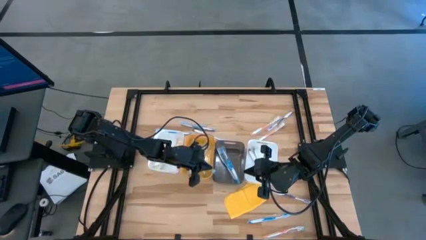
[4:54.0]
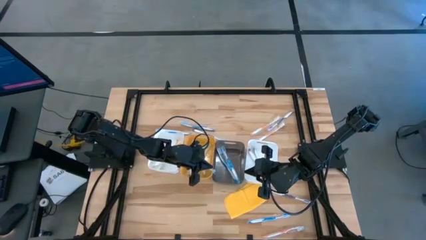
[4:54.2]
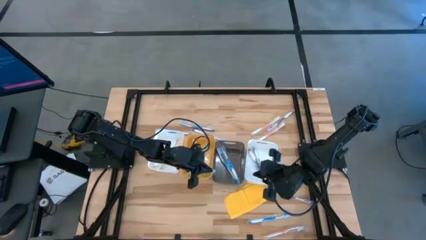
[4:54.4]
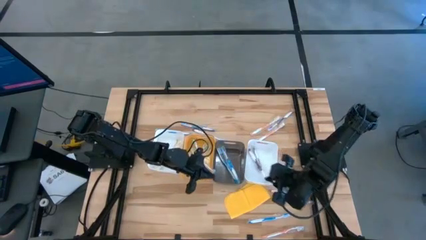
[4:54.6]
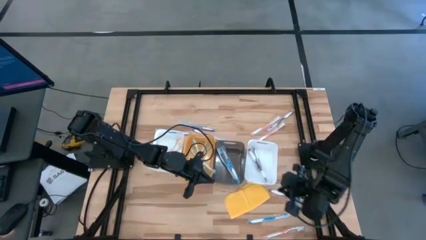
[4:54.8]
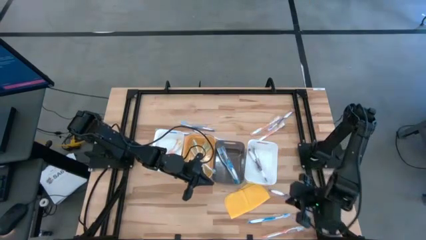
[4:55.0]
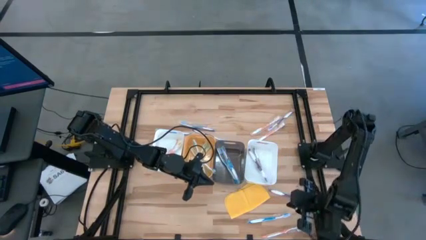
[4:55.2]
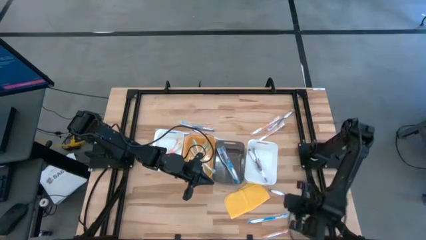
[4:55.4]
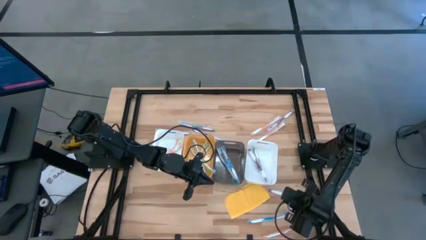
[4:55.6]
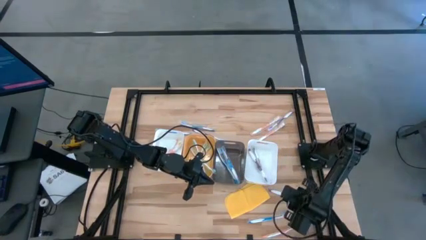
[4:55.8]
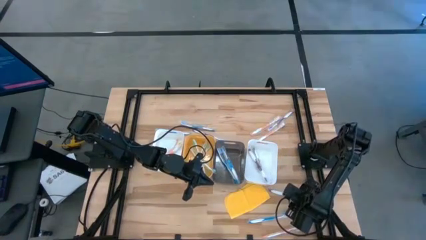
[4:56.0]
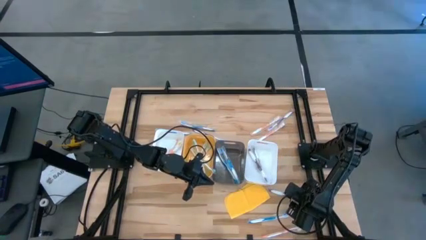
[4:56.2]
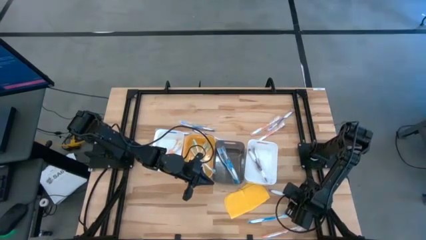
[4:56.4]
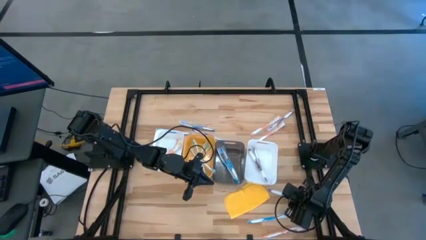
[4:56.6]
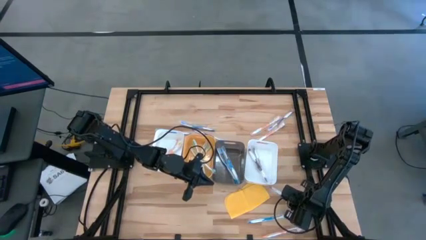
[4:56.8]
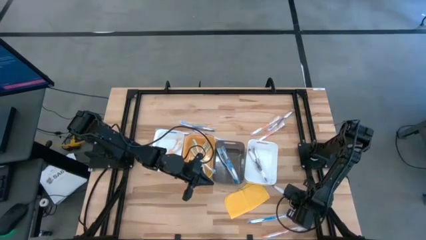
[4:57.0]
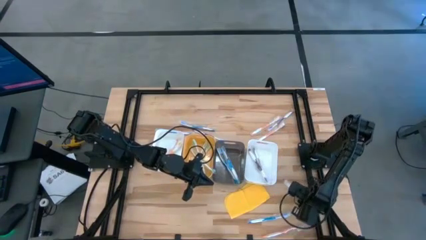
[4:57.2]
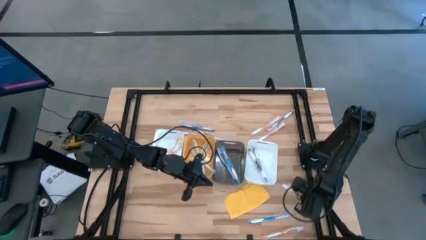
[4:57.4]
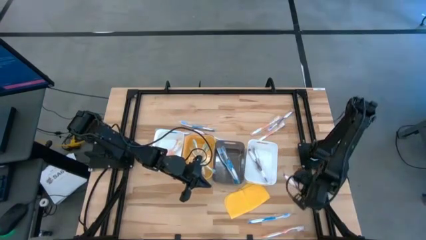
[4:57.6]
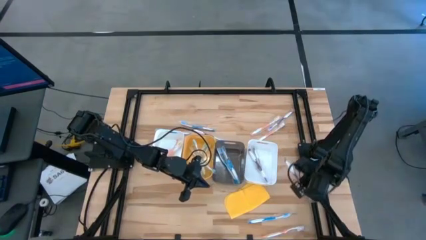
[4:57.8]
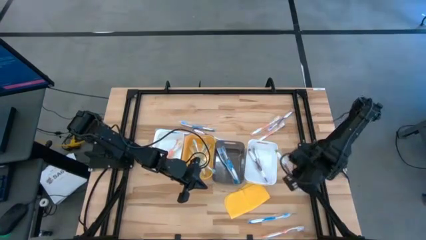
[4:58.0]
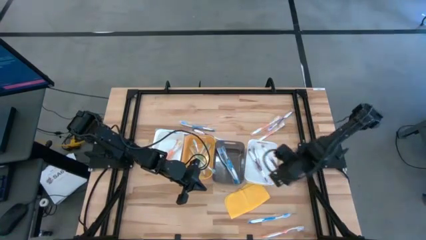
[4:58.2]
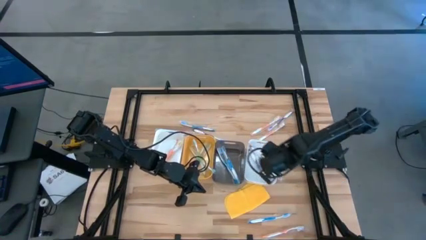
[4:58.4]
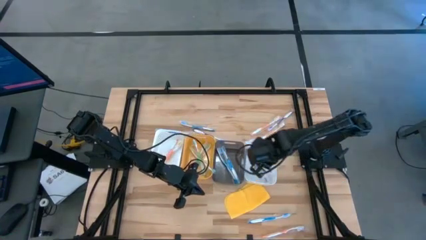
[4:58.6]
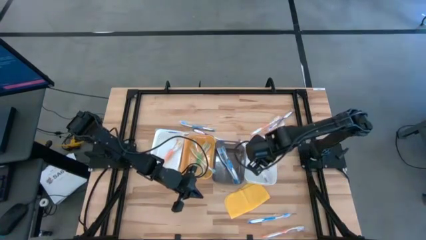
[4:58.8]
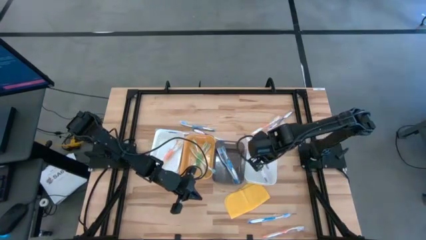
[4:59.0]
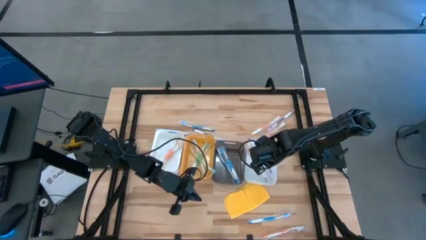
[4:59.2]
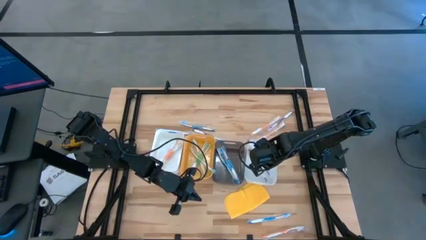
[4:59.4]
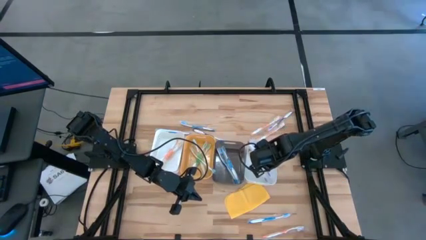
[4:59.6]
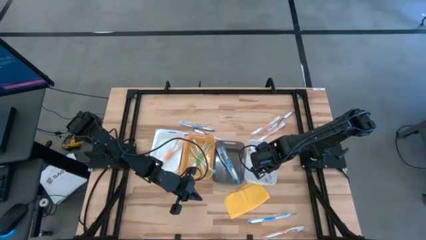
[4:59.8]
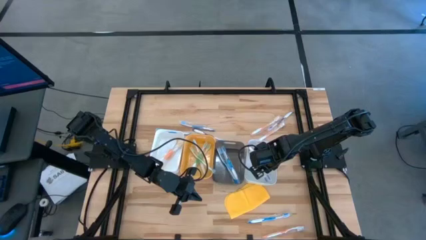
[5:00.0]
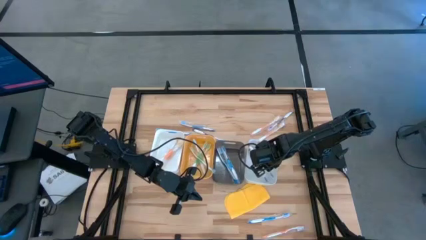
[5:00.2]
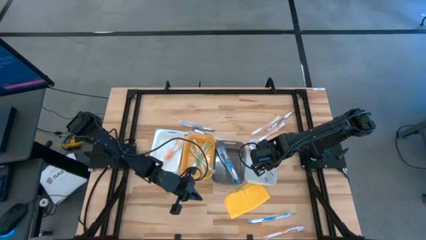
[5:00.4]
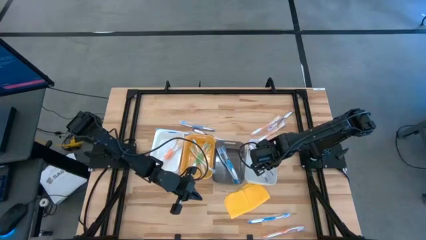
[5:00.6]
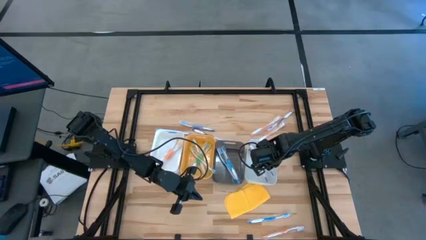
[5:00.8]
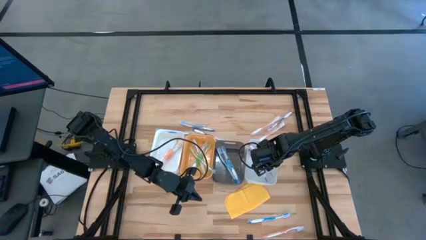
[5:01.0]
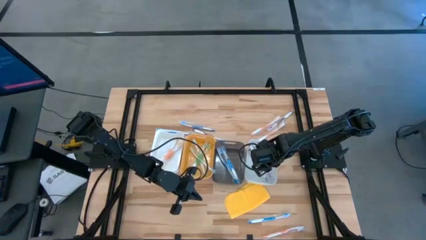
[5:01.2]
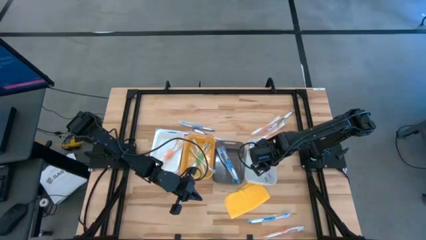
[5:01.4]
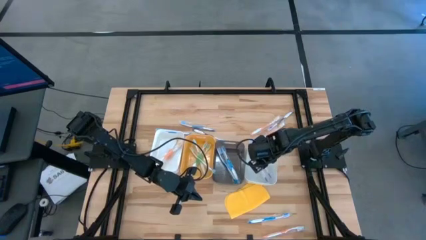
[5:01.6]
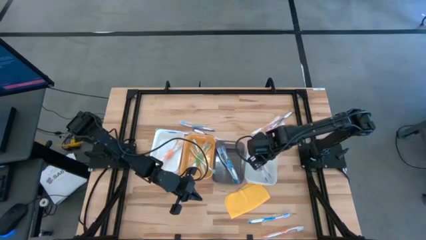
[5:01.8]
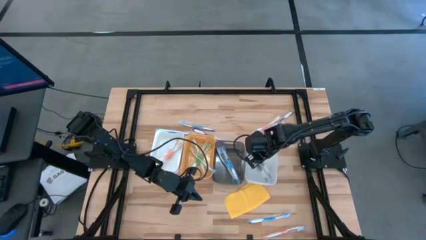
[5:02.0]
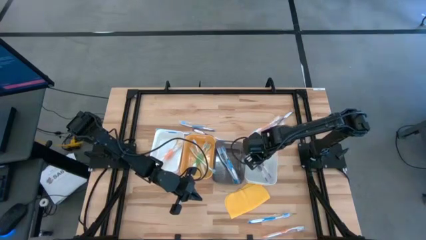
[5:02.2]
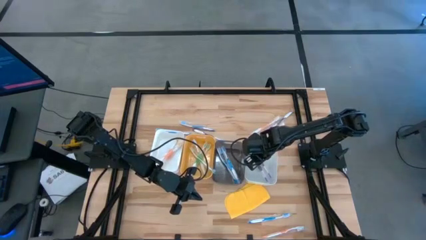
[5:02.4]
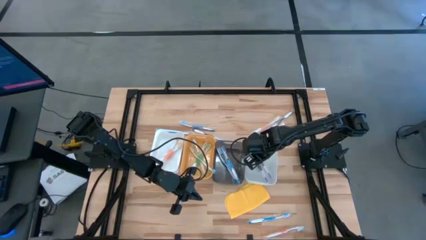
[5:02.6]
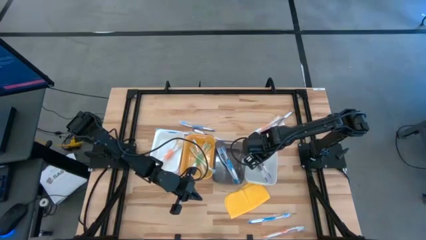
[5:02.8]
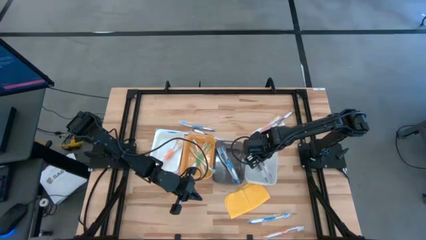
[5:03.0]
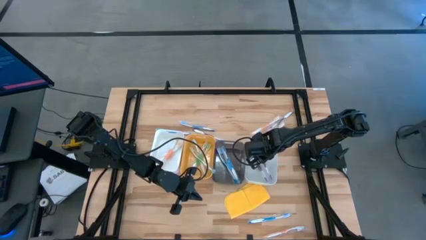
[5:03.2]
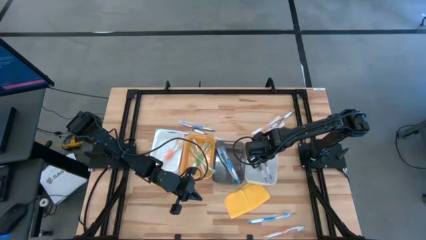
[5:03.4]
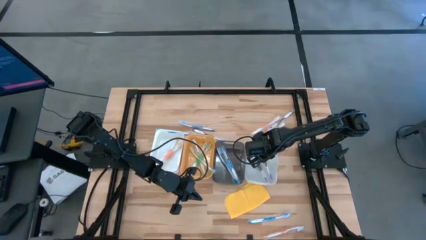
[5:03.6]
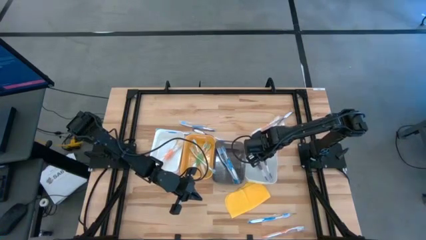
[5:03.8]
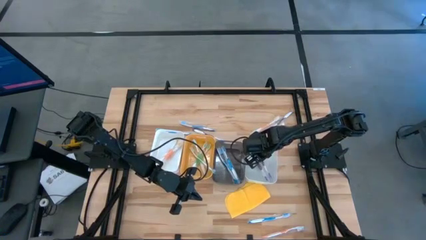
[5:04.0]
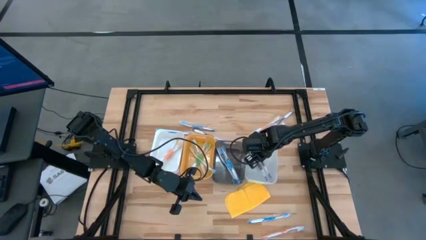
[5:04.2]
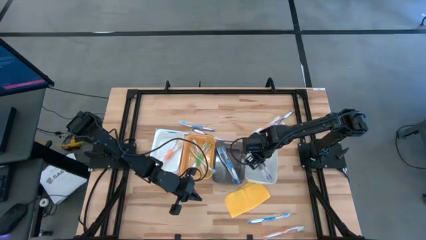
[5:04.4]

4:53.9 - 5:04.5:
Task: Pick & Place Toothbrushes
Put the purple toothbrush into the right white bin
